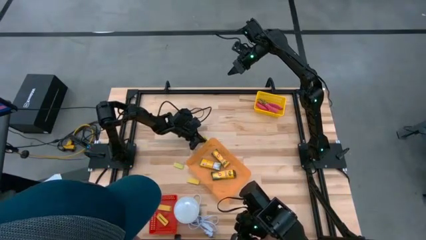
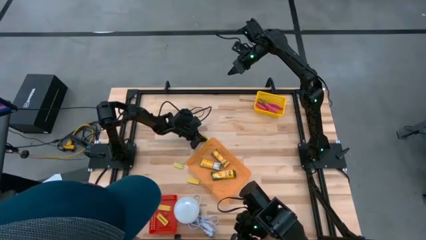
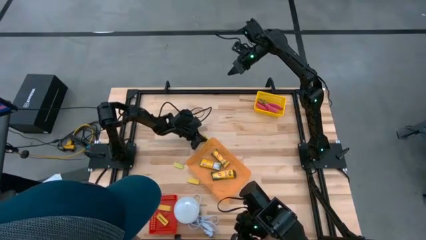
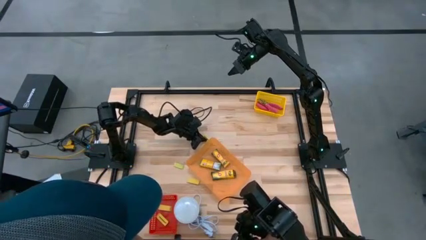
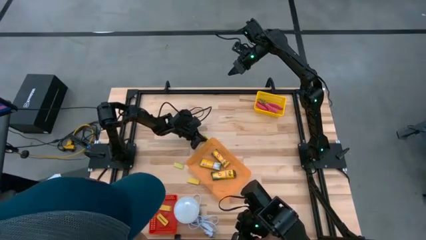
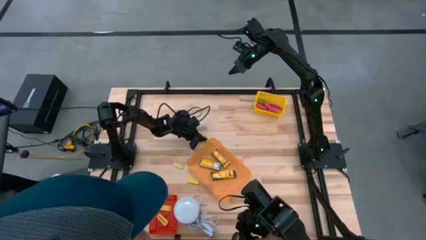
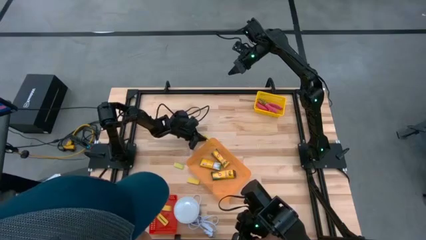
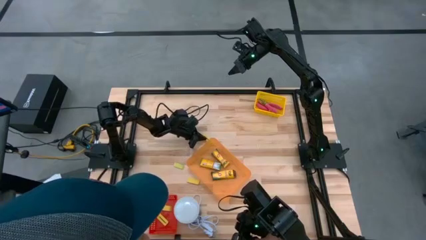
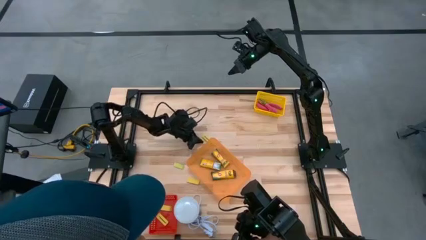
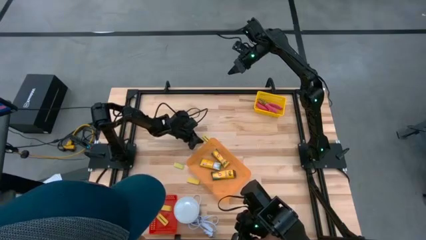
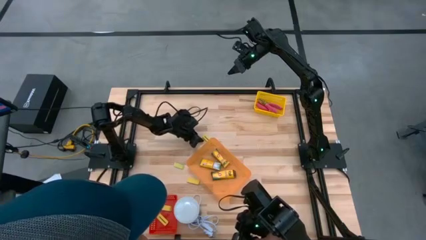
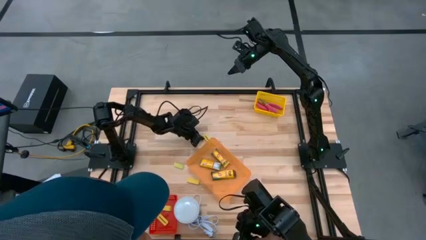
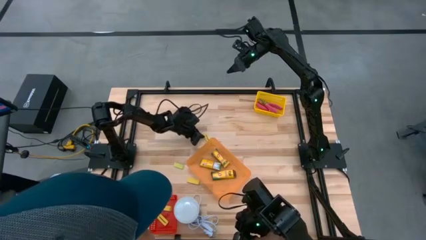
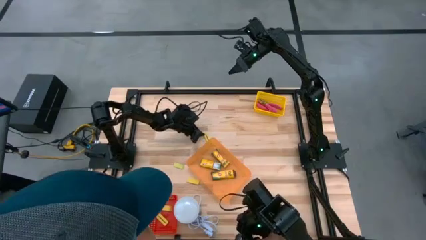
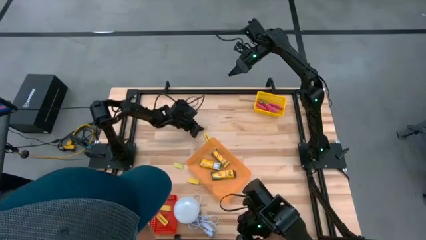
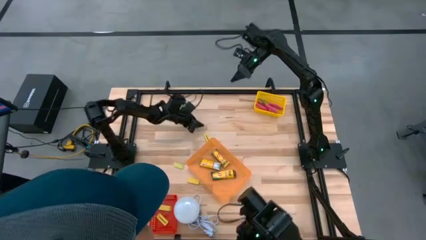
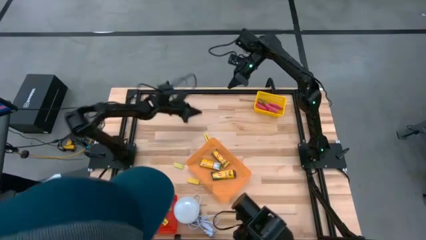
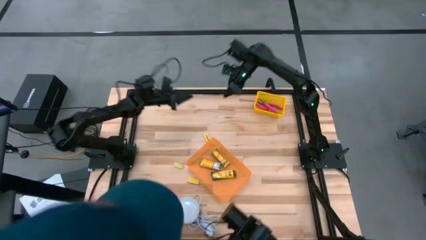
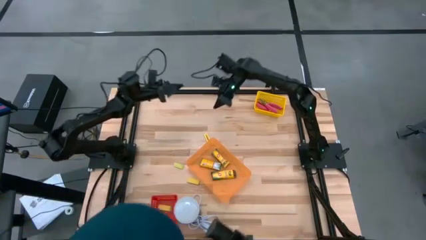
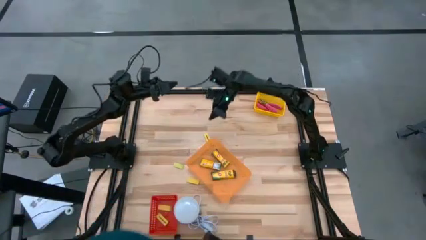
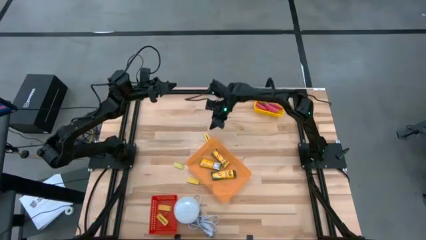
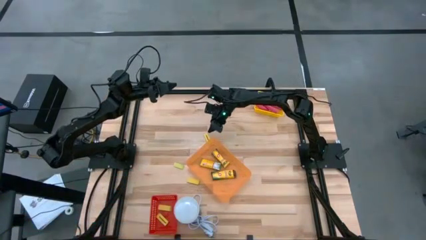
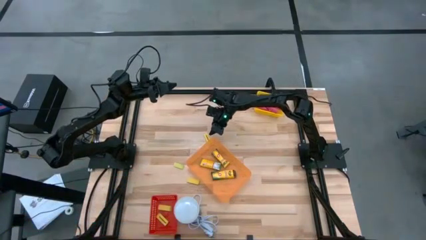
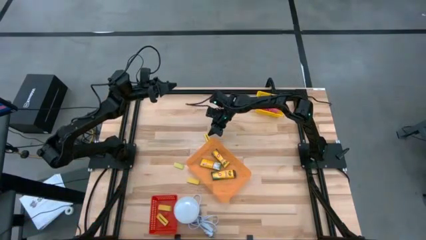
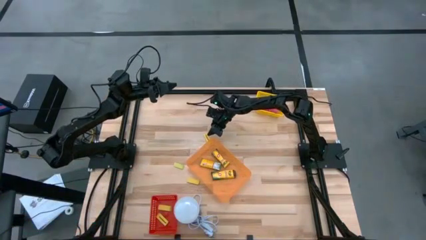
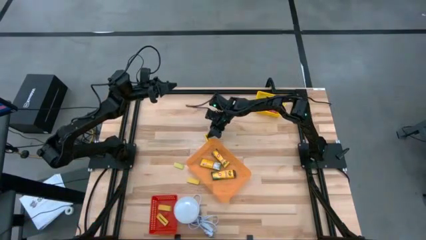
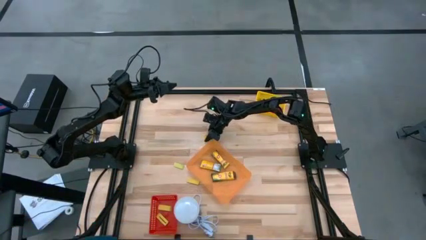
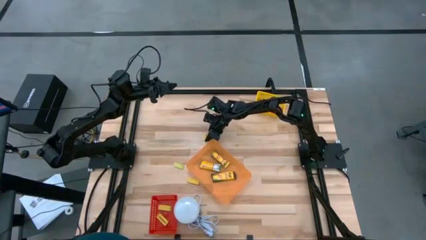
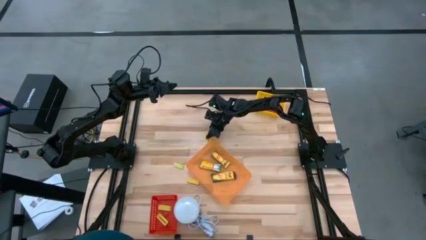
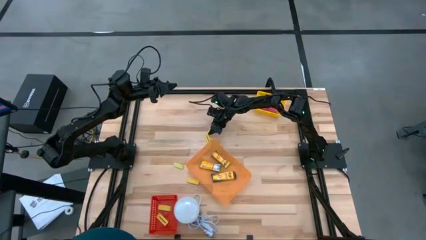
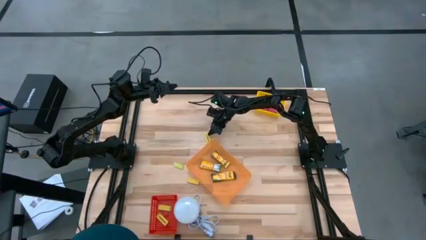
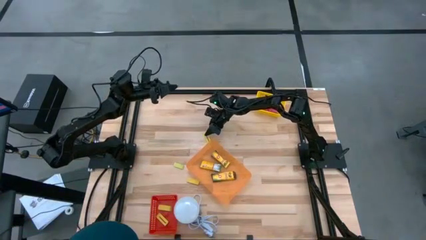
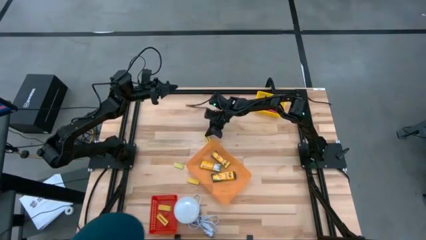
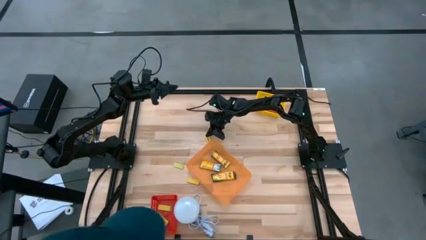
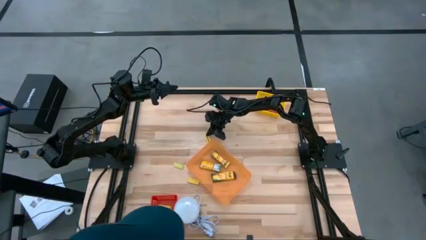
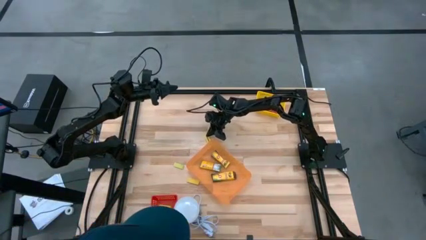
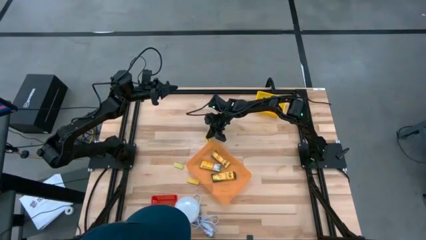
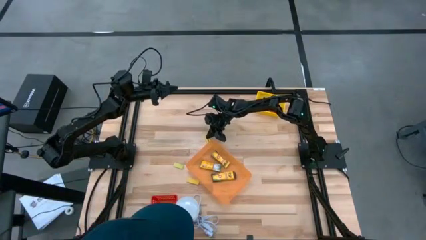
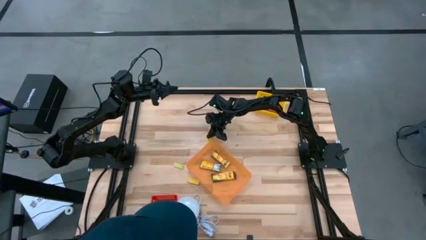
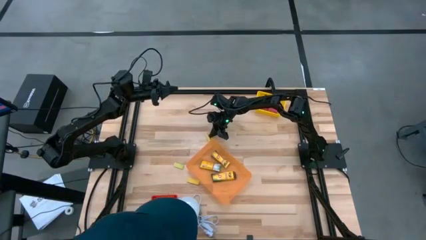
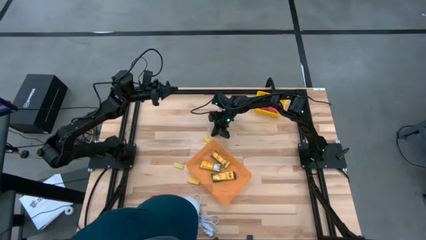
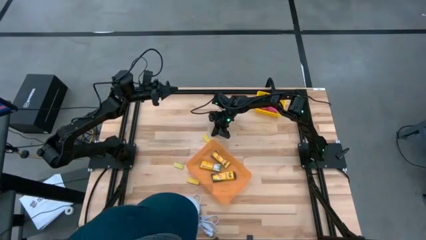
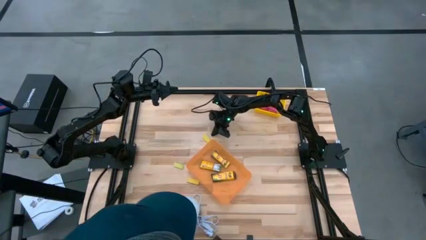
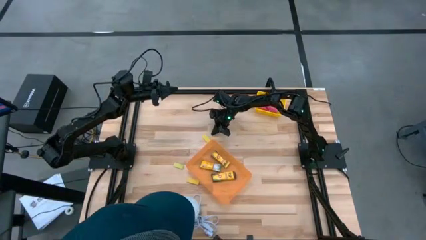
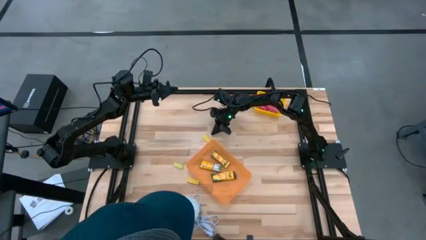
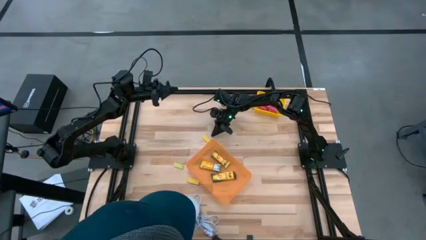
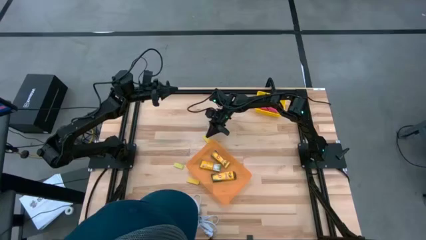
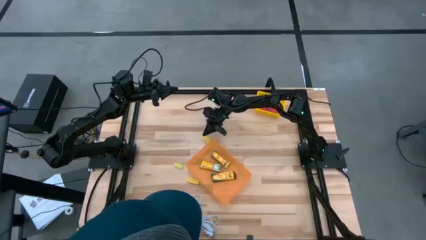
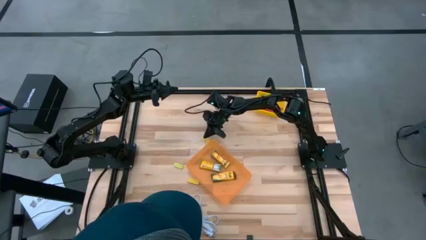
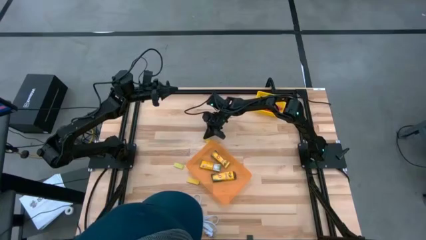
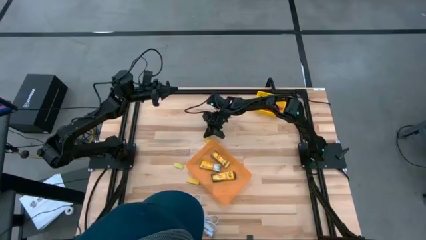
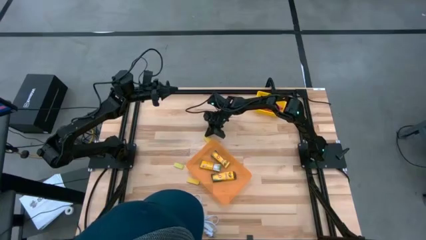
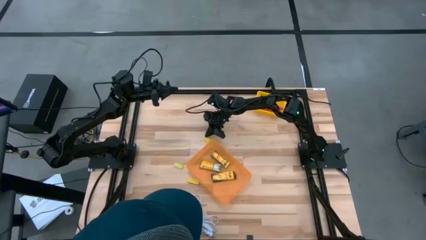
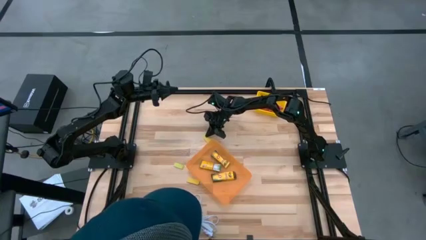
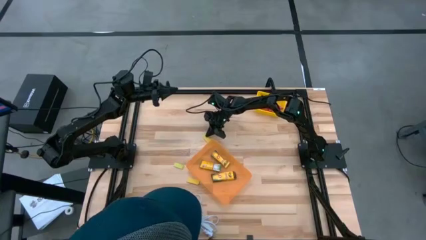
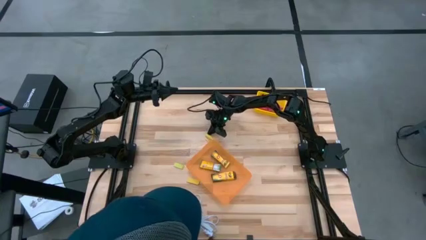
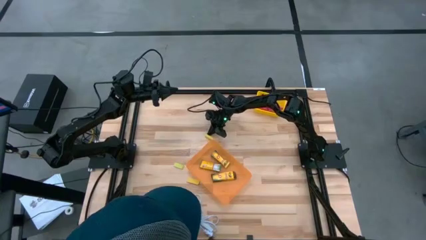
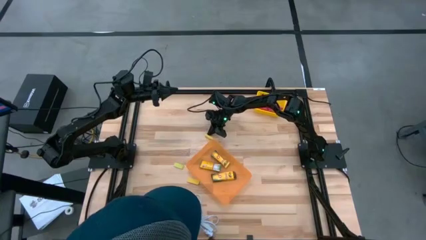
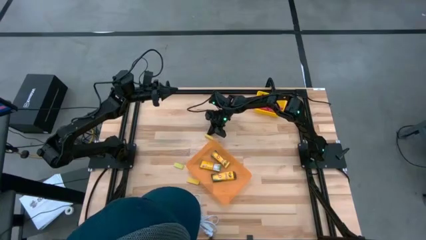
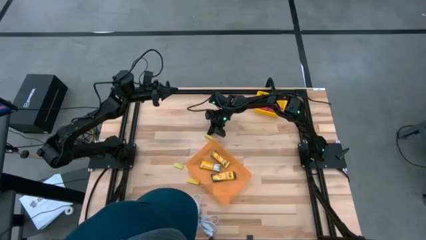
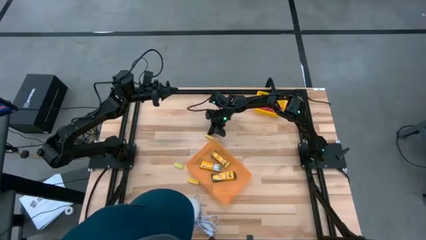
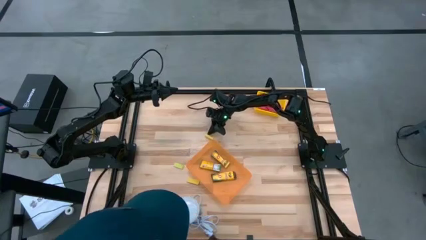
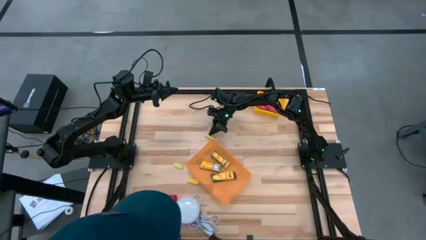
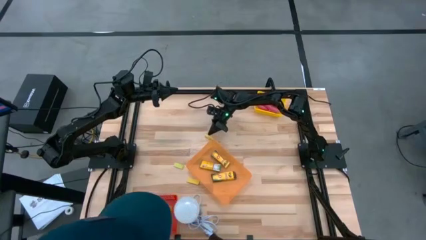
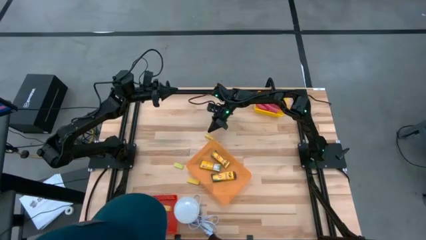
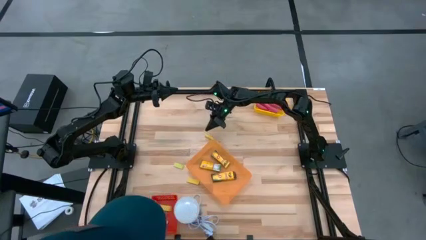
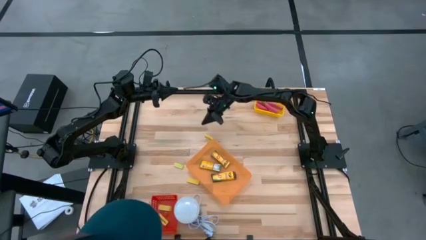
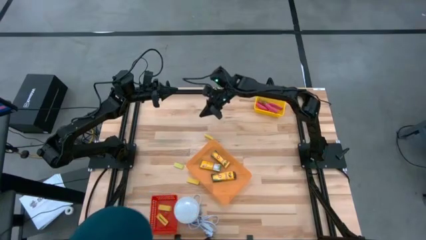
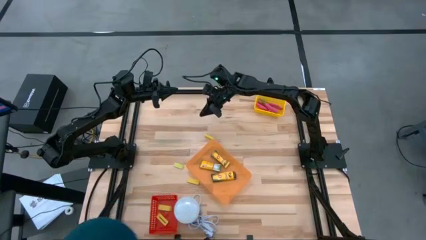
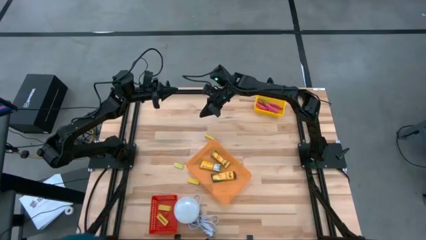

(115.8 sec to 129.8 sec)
Task: Pick & Place School Supplies
Put the yellow eraser into the red bin
